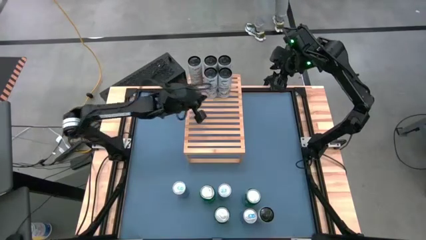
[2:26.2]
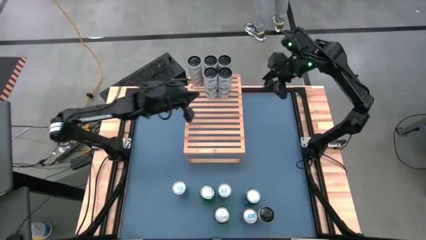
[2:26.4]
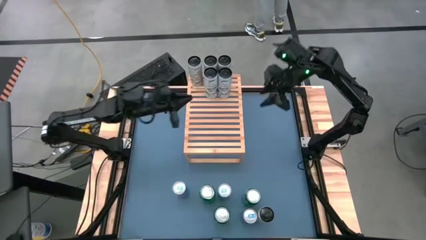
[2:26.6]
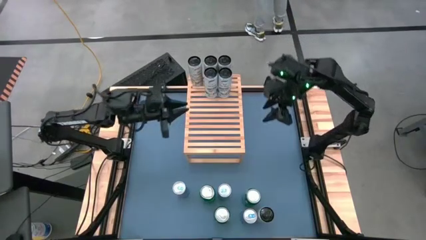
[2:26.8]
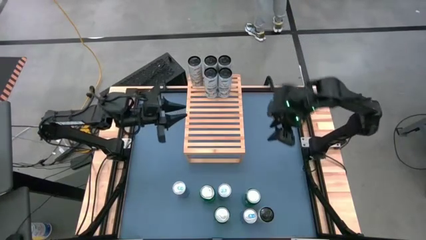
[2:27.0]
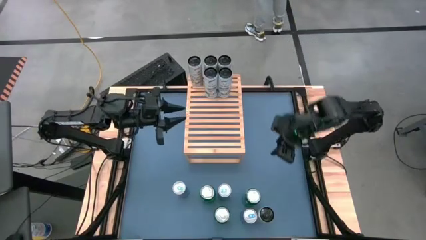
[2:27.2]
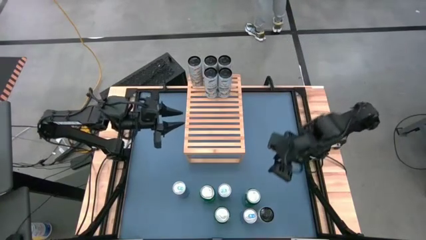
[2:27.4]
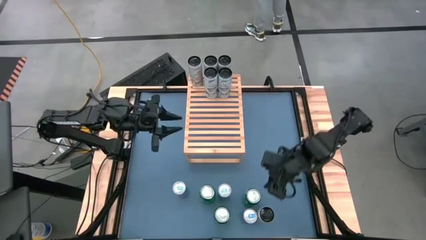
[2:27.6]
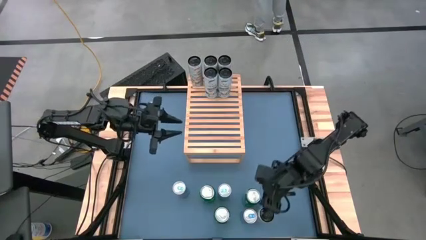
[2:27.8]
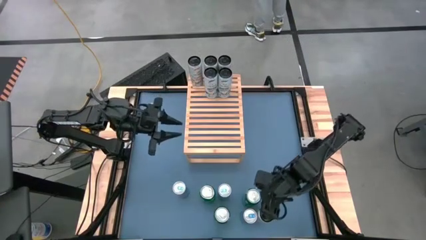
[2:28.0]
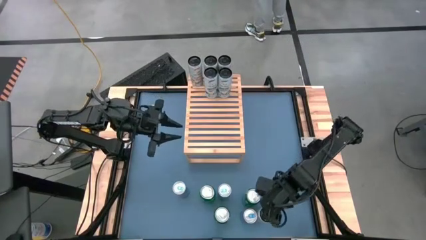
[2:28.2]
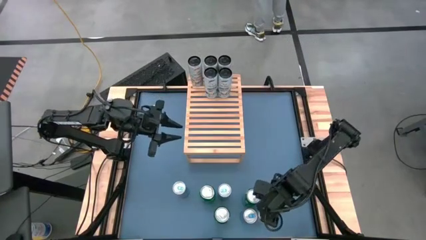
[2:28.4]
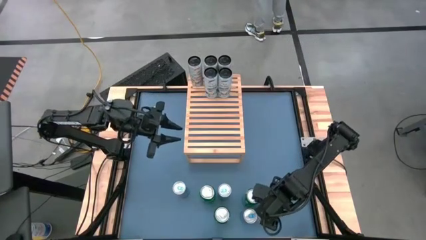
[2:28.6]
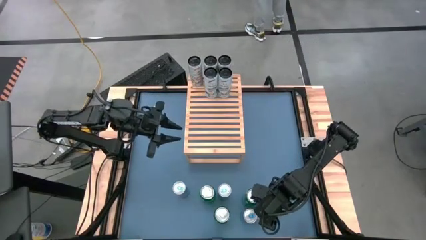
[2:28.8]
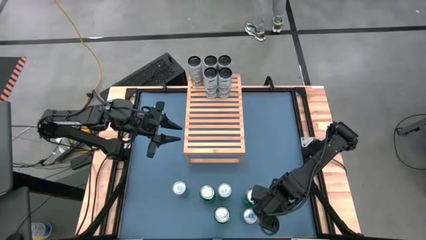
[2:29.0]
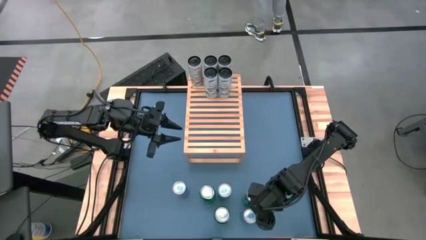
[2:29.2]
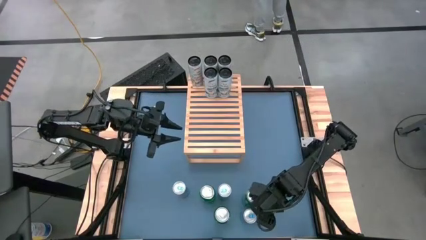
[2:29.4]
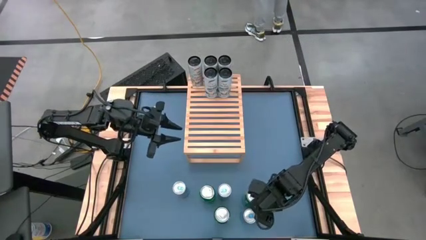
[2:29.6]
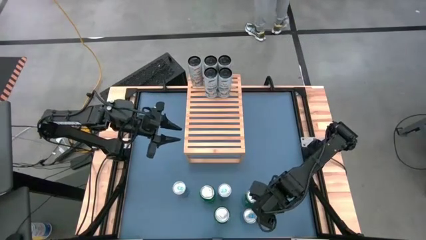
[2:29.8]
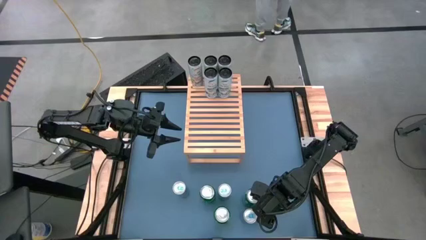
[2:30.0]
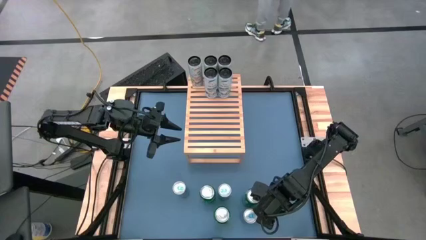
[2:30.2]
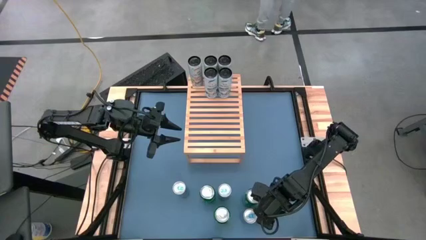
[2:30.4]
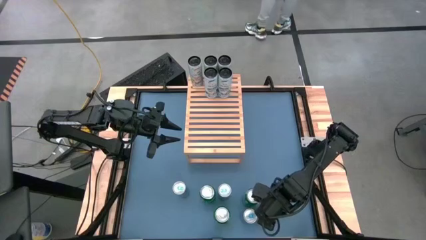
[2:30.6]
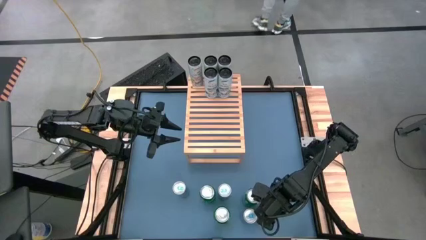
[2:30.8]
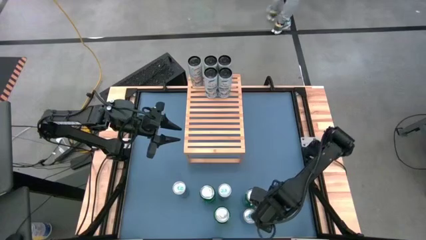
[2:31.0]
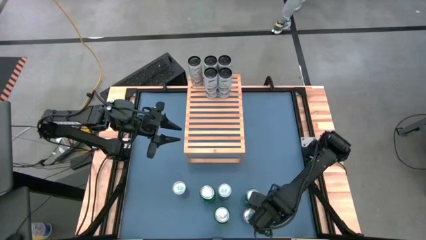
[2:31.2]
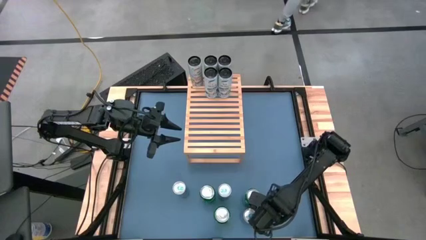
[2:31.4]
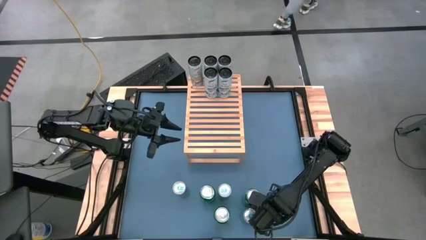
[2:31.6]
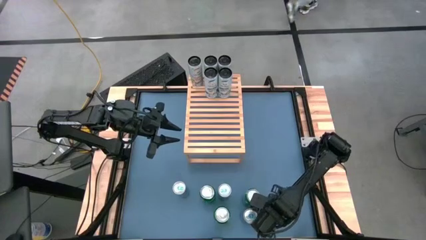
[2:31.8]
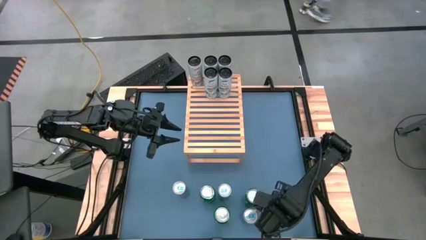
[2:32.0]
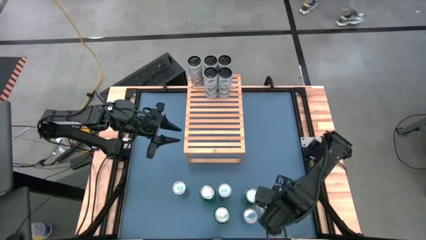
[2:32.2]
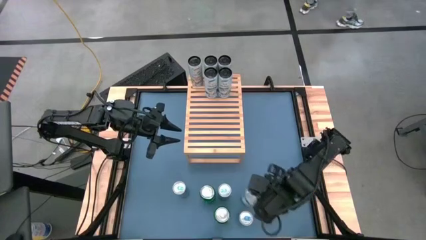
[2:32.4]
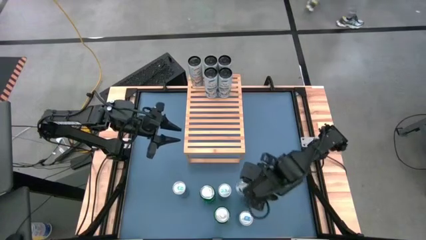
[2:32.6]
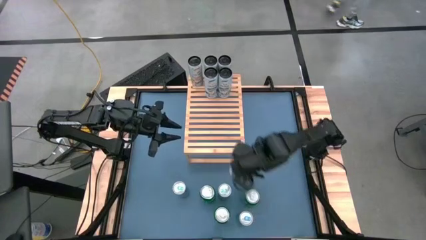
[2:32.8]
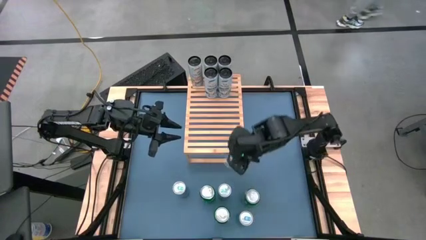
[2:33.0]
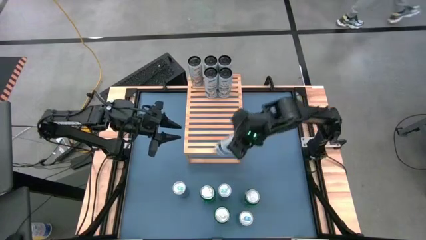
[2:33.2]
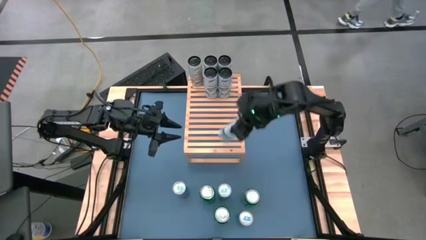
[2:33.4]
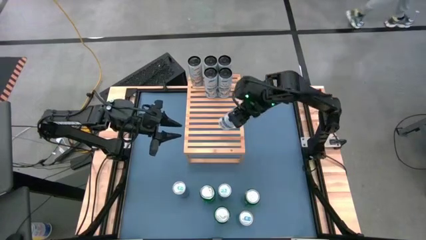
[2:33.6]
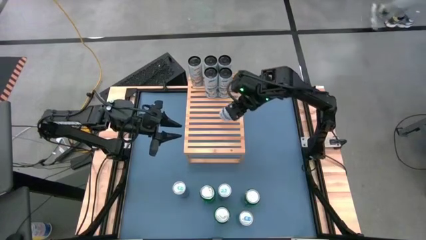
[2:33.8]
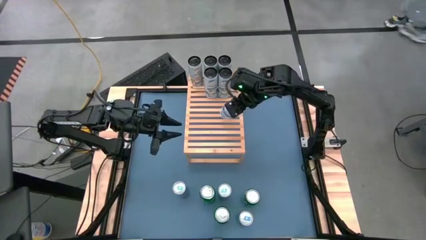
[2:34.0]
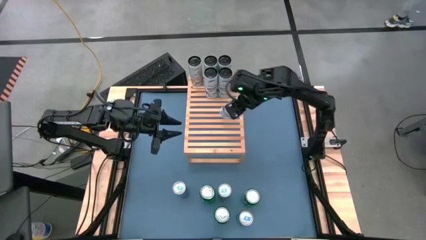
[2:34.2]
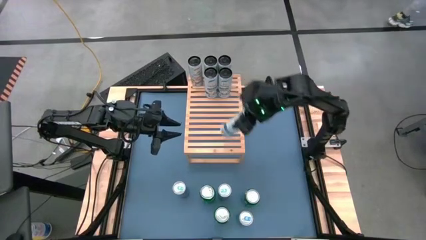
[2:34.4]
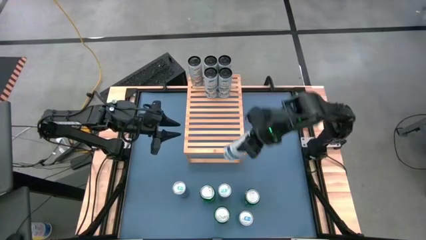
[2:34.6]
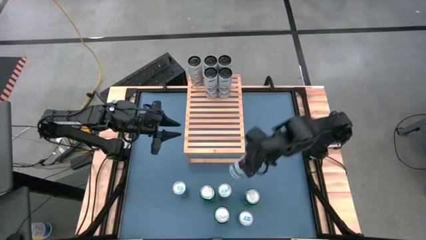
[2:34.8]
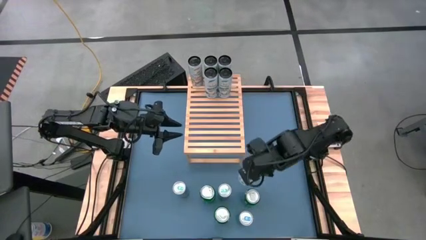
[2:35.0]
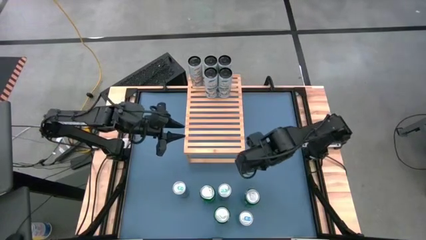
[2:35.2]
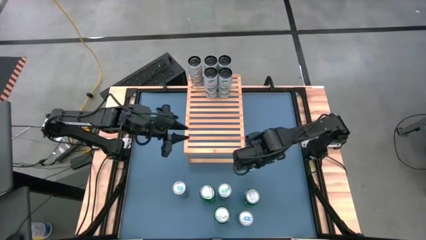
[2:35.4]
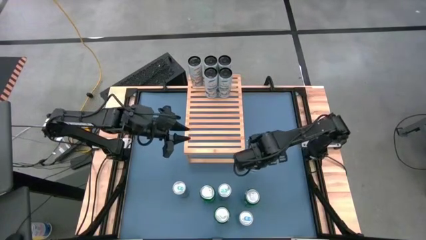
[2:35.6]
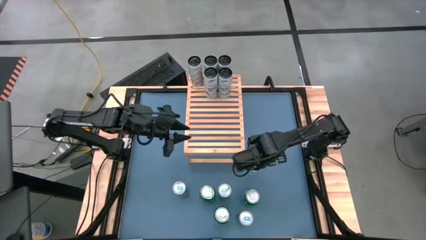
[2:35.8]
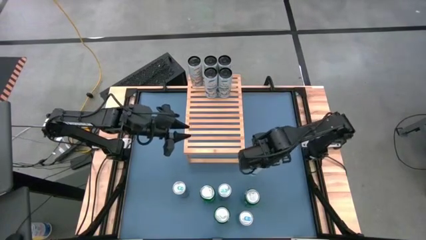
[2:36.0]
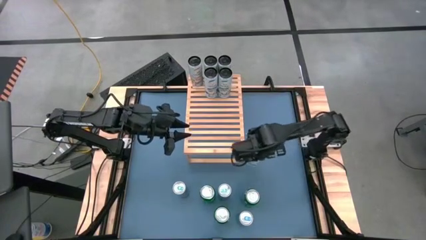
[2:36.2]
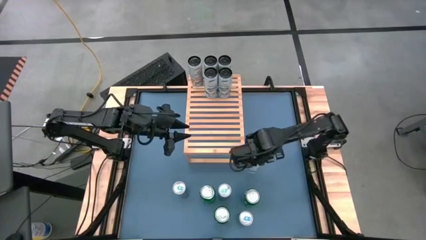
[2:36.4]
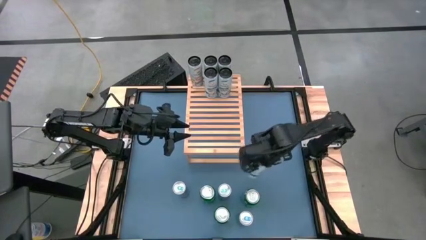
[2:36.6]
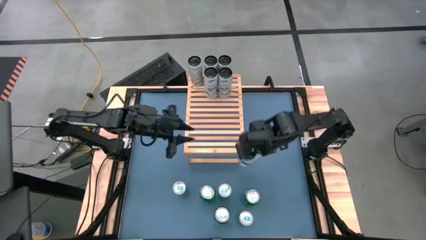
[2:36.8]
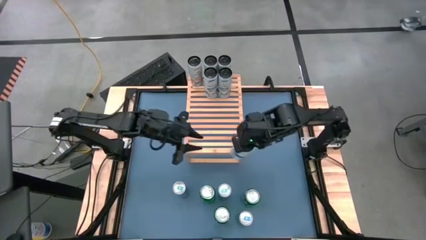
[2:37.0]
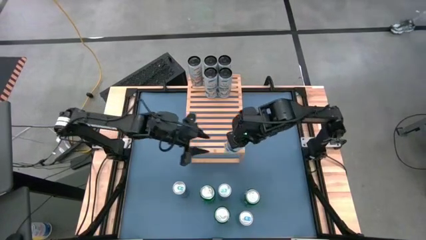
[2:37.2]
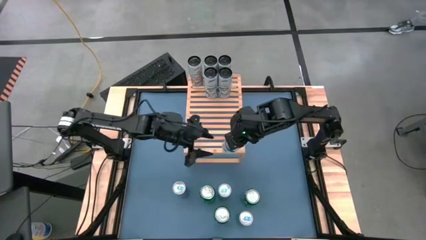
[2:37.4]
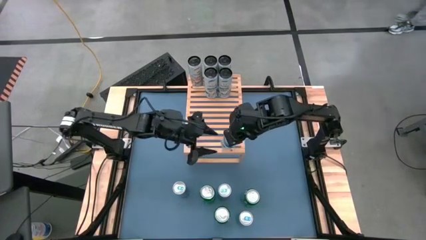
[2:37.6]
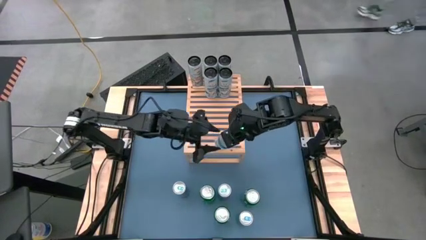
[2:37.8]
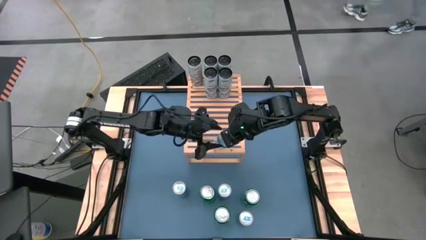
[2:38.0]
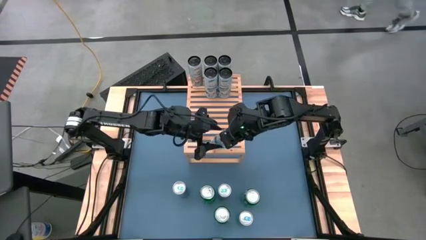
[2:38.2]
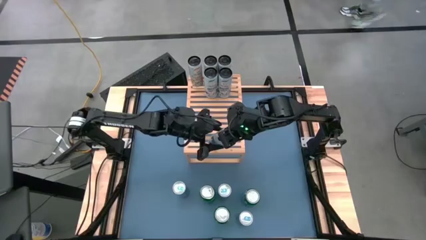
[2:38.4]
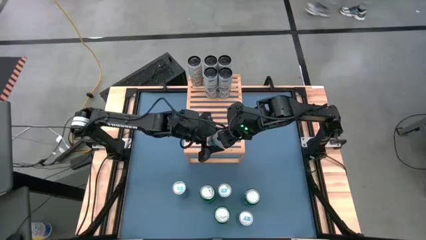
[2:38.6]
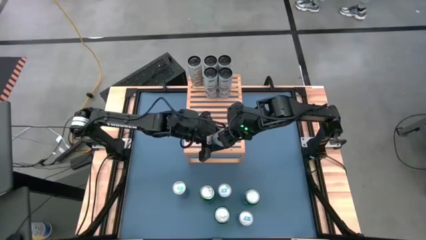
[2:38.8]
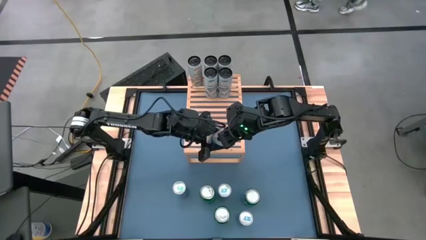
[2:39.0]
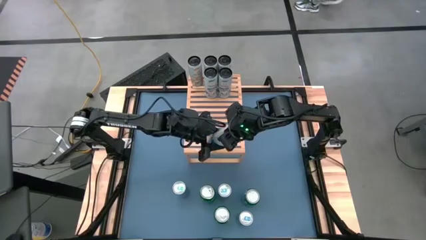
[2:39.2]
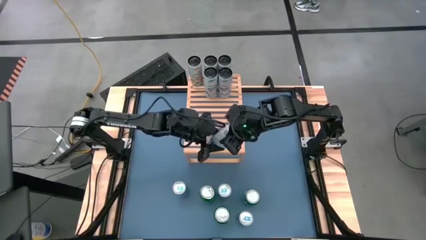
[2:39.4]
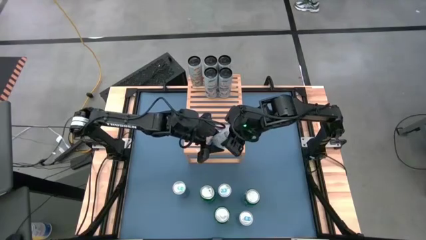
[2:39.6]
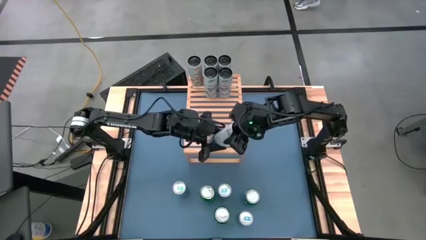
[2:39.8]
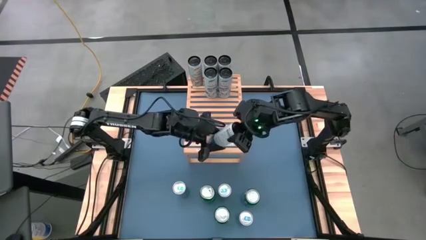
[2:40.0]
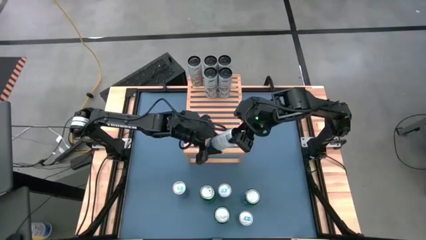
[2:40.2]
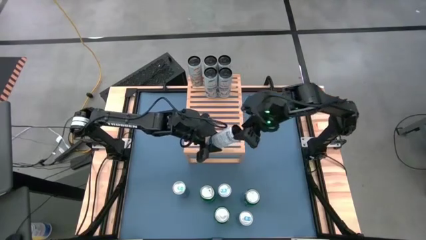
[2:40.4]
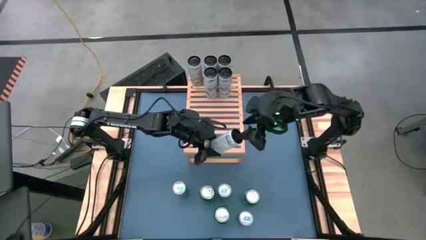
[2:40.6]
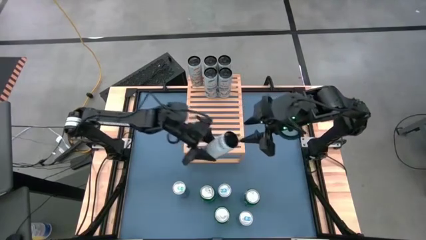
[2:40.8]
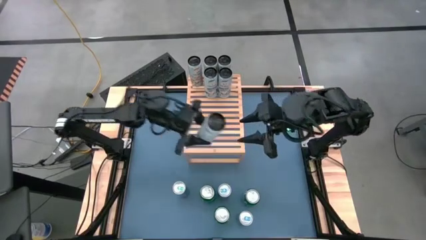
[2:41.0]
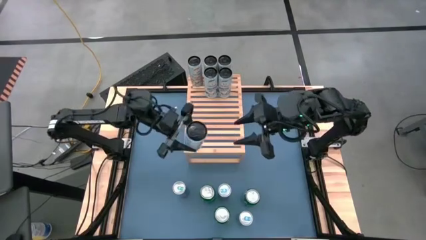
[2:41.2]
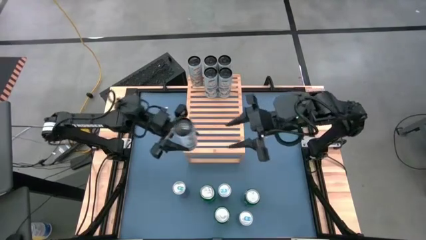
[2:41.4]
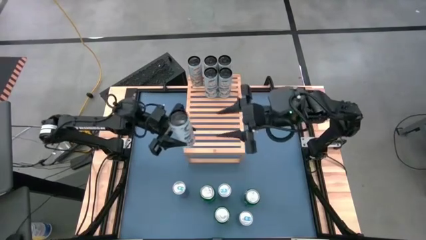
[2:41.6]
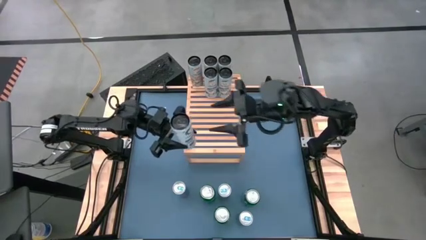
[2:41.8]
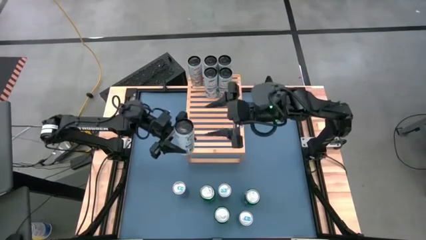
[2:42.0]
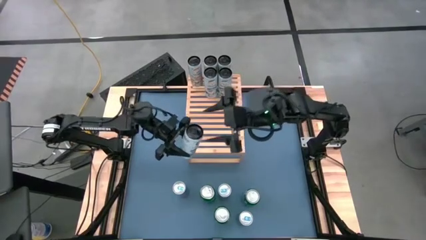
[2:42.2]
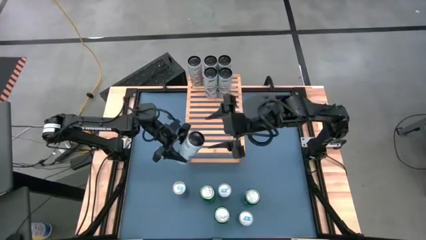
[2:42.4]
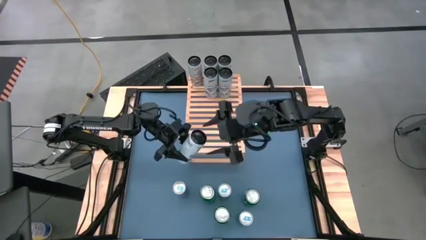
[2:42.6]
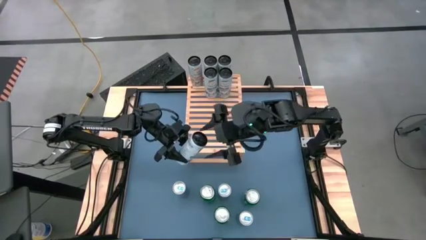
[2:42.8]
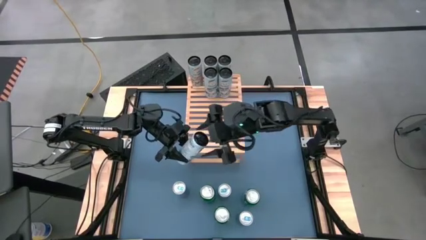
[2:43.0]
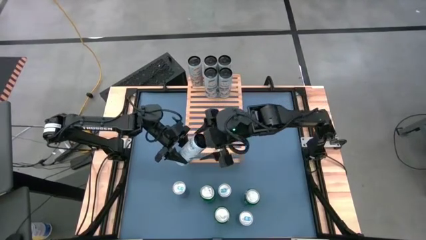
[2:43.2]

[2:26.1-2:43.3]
Task: Place canned beverage on shelf
Put the white blue soda can on the shelf aligned to the other white blue soda can
